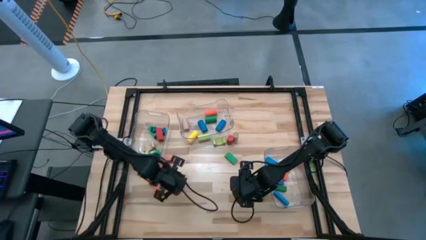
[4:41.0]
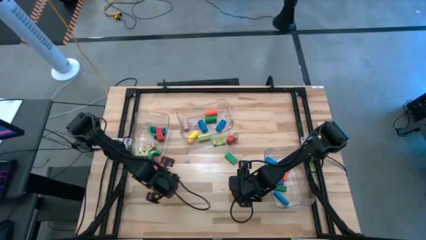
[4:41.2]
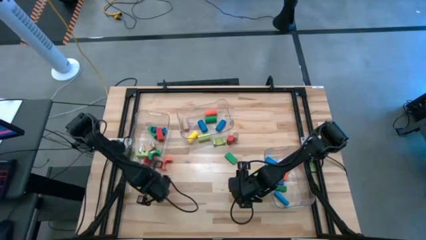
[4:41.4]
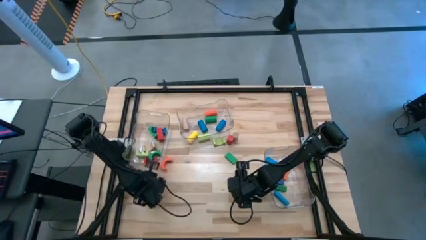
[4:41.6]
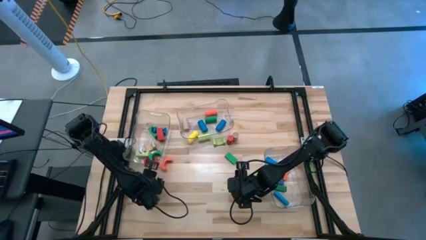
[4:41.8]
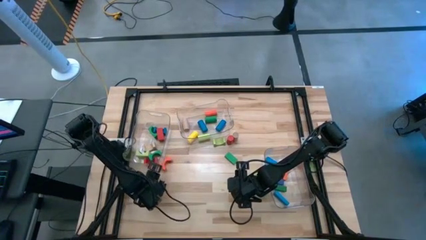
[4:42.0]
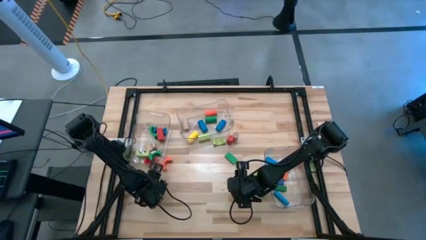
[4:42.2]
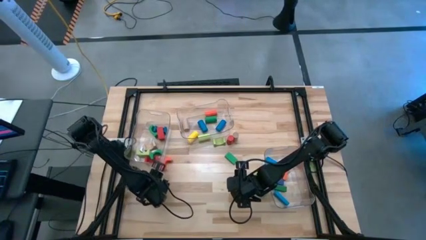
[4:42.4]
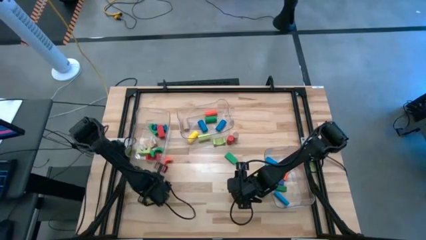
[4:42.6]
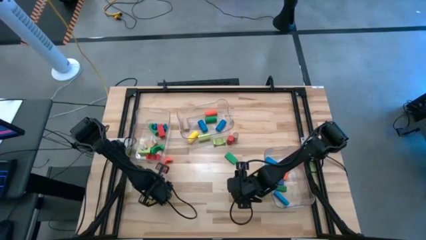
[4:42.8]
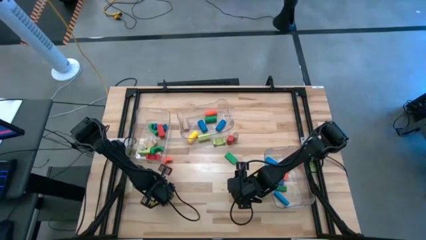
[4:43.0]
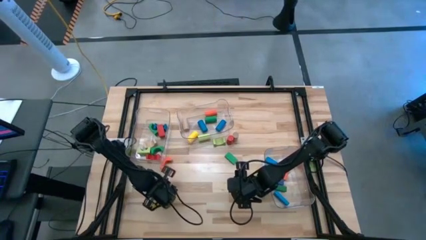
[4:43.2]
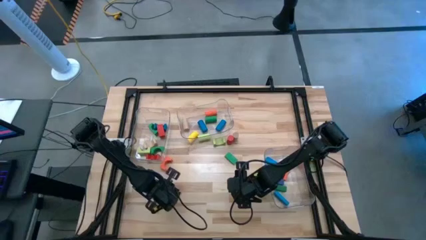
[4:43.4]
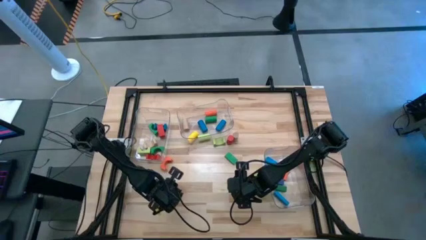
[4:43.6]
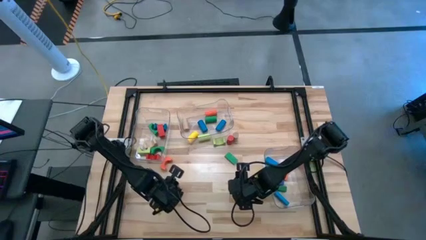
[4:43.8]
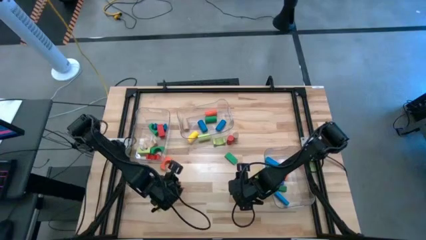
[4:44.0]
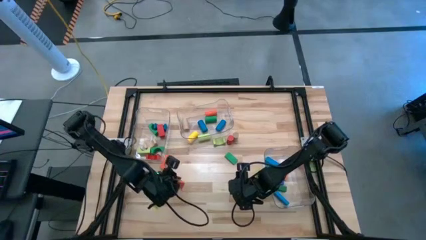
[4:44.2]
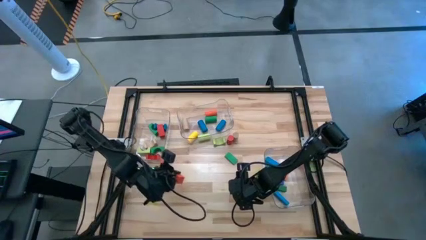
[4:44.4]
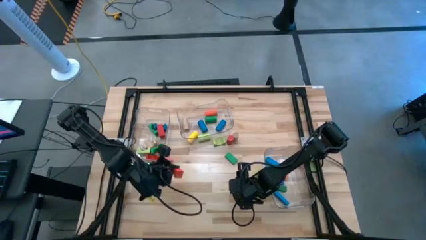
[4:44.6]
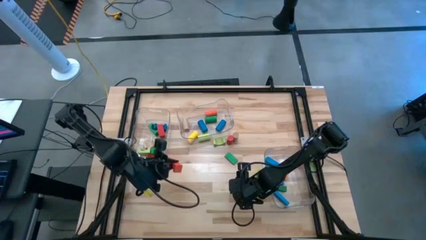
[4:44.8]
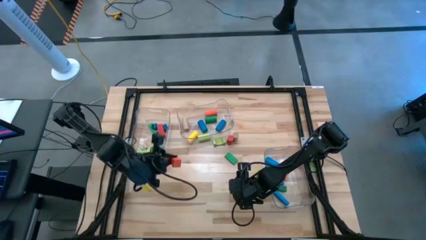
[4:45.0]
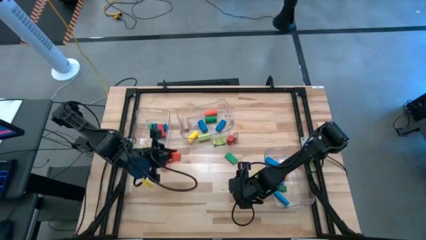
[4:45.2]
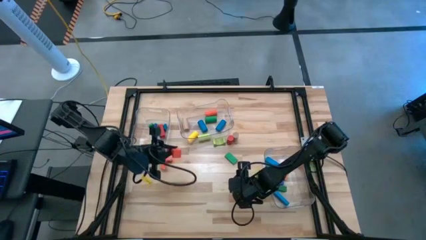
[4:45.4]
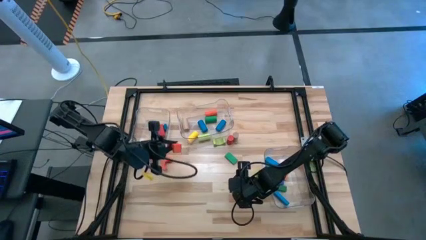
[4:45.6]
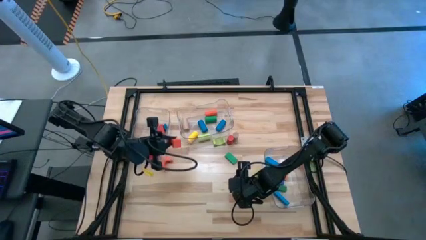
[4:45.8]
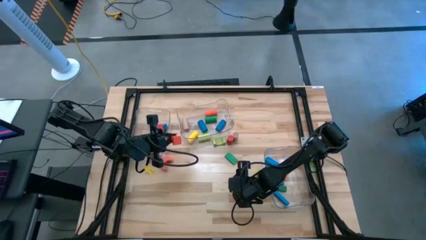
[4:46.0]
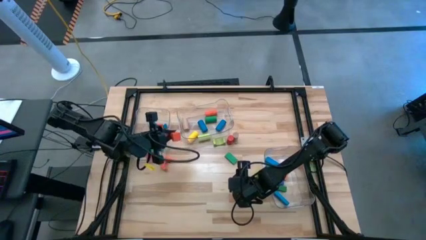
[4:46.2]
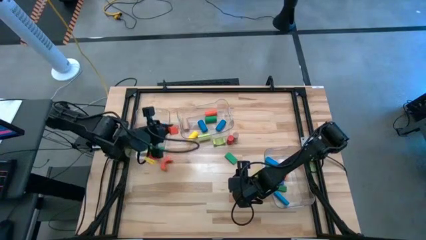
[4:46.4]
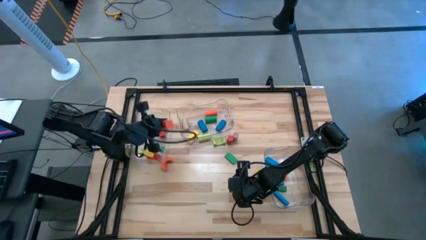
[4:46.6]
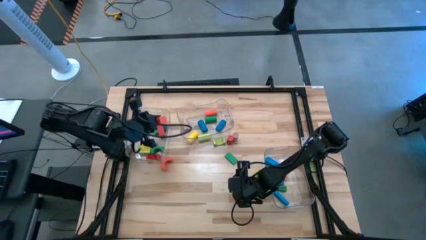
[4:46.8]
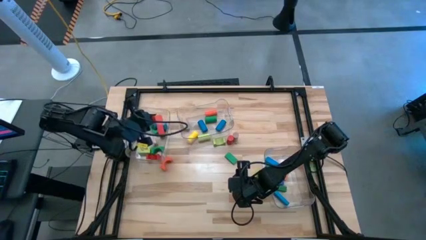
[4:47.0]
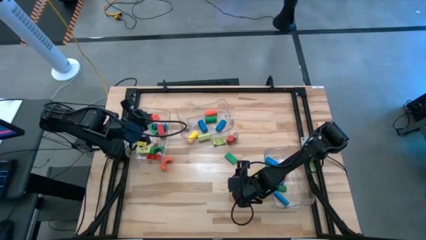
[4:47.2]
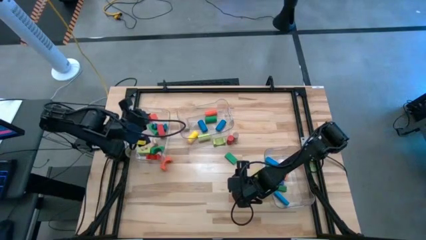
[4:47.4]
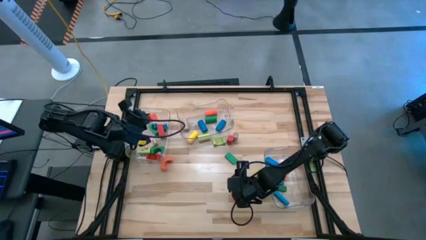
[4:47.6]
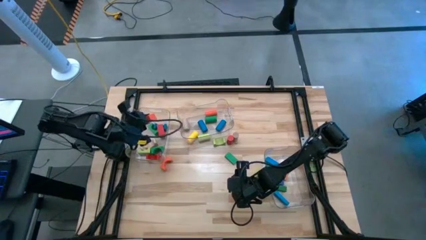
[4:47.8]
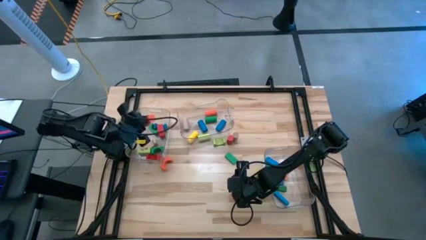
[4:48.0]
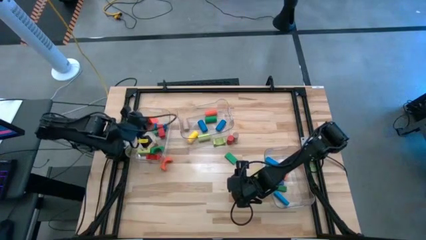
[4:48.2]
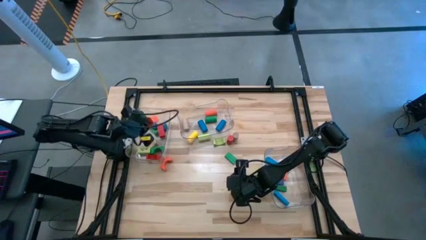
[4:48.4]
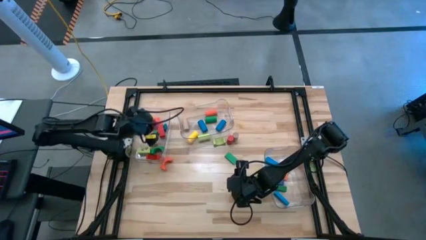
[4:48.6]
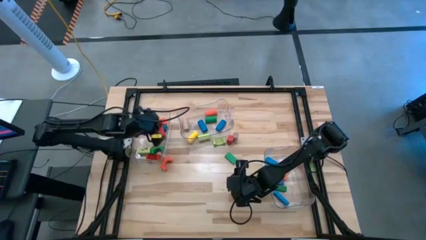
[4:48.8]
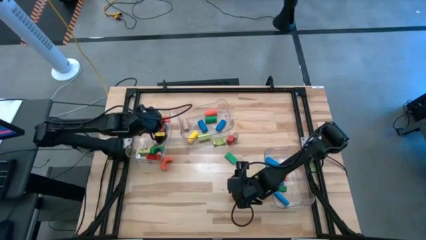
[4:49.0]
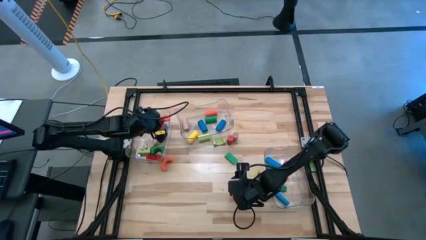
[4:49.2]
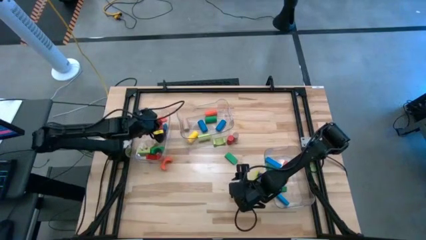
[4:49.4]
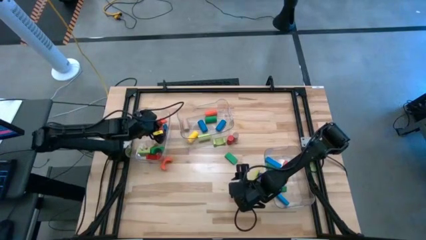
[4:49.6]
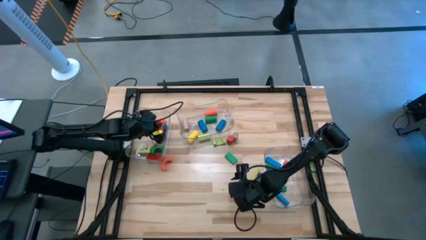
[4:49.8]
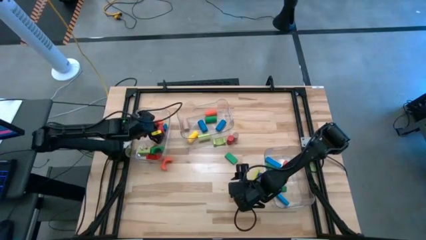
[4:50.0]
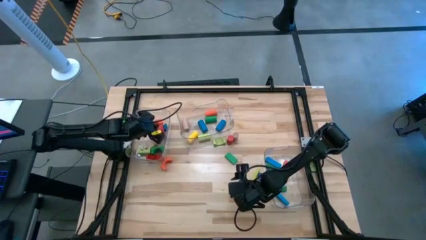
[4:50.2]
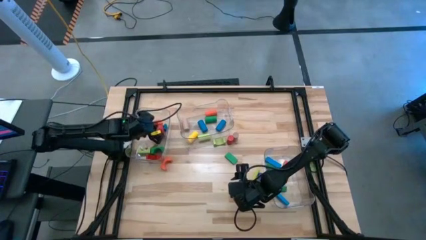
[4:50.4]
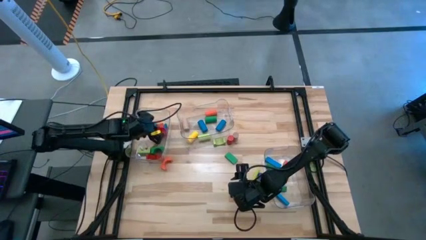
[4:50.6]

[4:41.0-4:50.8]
Task: Sort blocks by size
Put the orange arch block into the left transparent bin

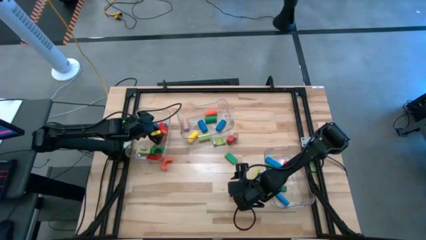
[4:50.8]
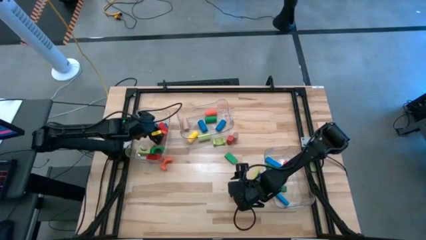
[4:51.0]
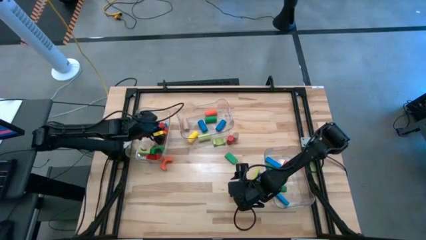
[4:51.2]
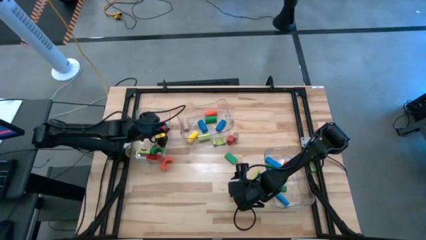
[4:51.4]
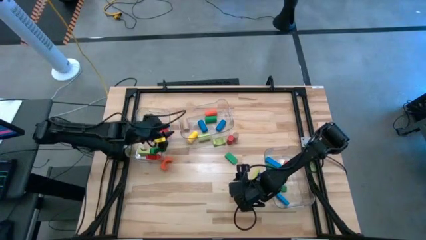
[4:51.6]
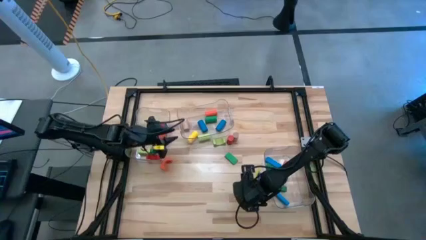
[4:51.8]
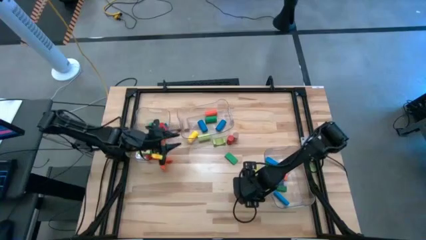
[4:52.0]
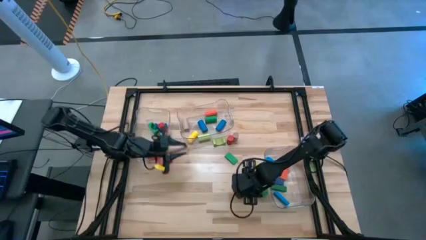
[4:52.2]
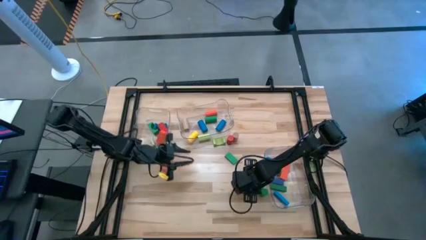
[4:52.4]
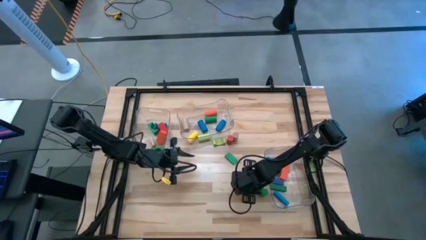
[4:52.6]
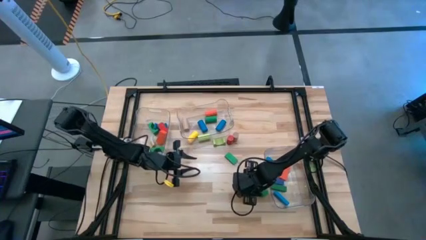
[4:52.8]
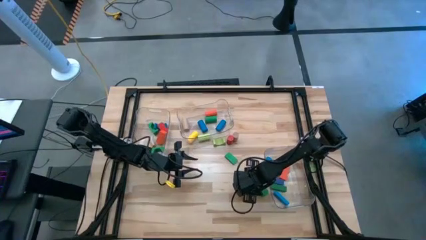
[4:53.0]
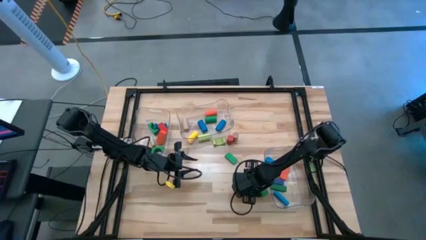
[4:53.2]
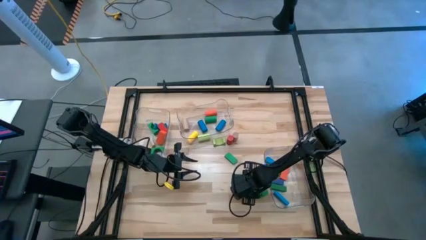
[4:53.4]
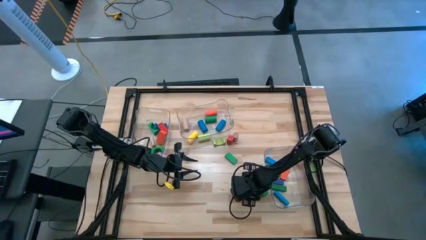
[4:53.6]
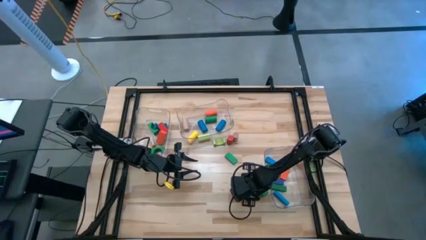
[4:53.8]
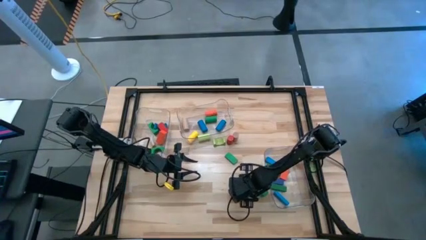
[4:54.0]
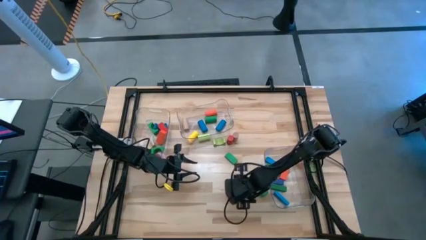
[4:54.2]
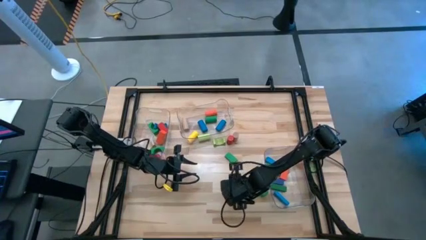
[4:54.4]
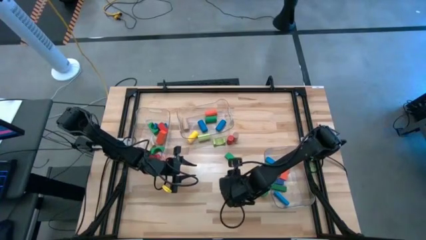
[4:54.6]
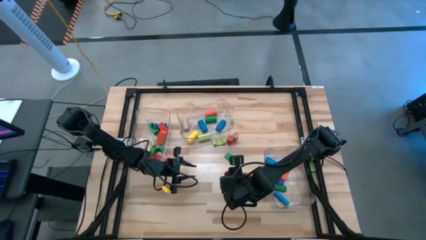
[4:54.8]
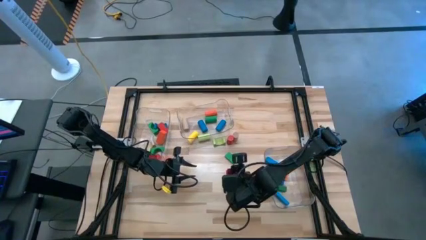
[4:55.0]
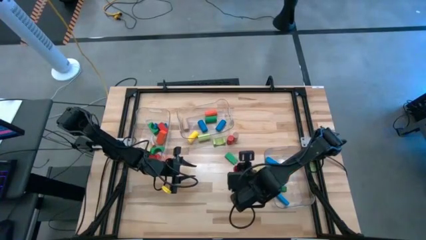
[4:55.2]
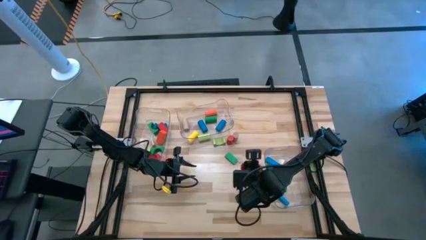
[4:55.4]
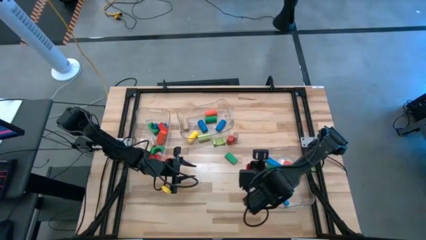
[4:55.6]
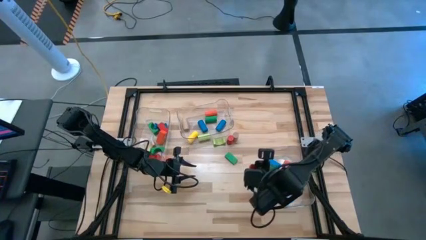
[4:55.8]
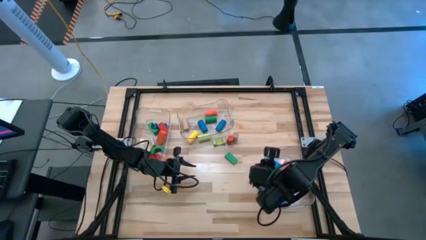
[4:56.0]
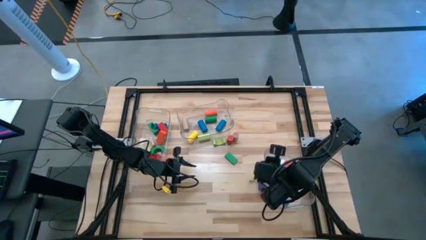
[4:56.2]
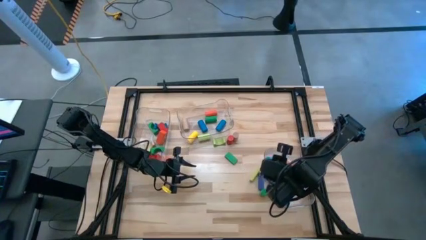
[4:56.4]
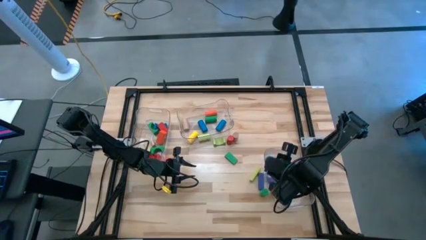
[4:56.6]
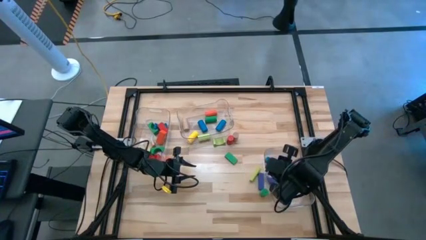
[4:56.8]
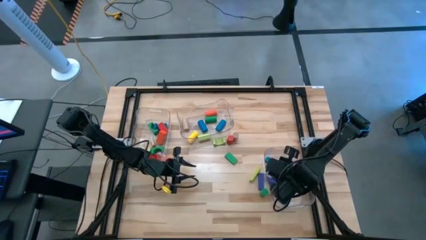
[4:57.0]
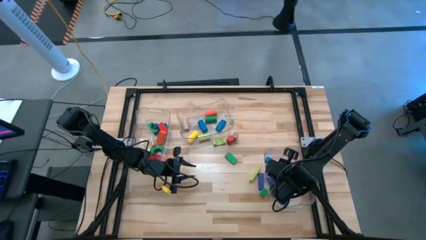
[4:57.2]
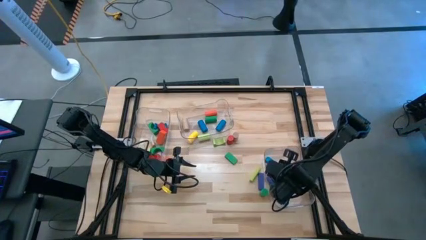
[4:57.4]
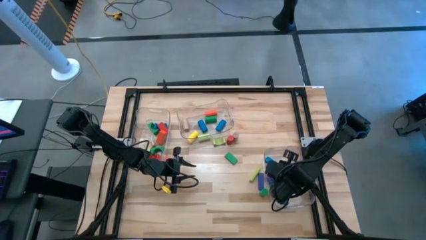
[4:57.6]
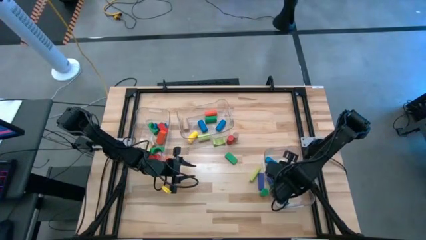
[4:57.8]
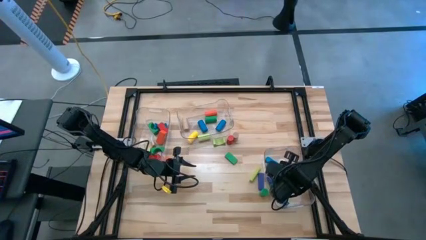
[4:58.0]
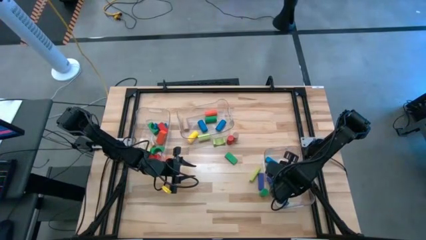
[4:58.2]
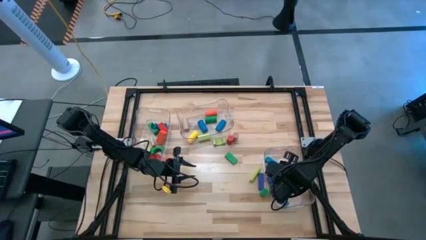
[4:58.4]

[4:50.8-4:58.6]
Put the red rectangular block into the right transparent bin
